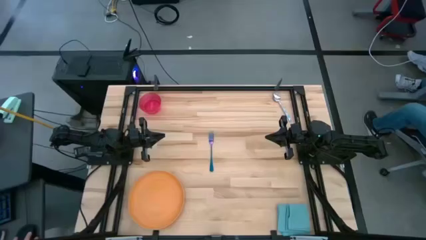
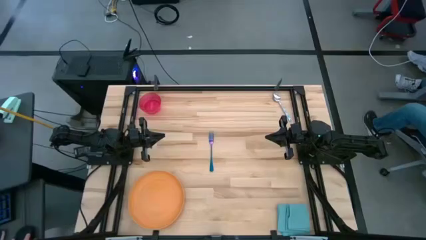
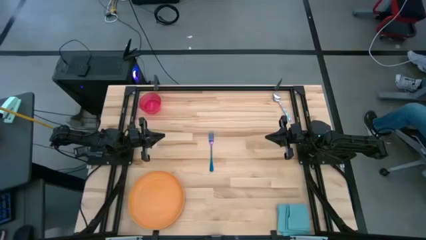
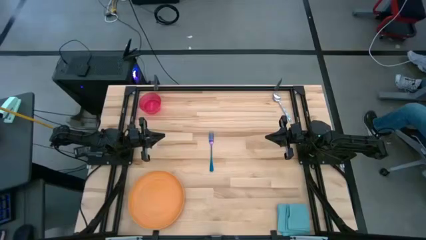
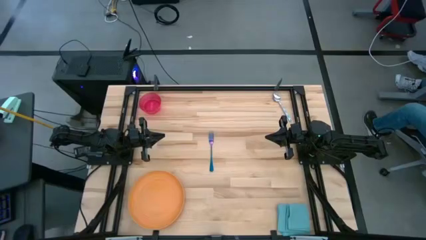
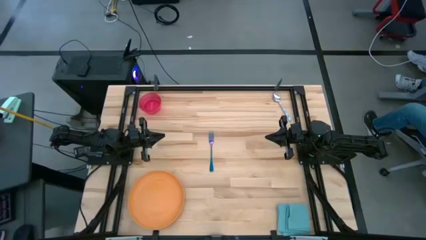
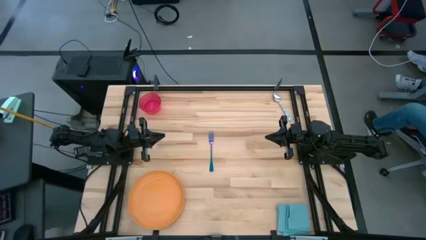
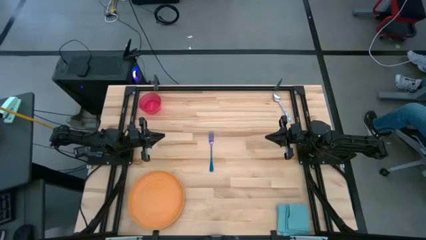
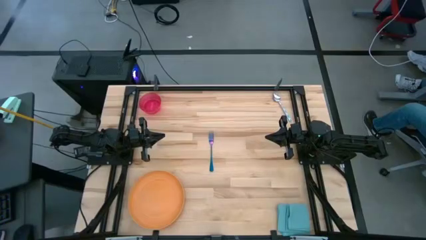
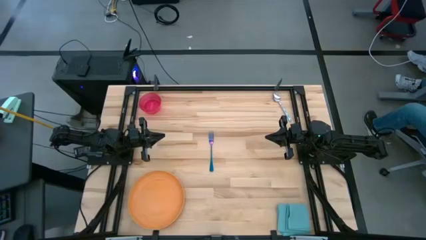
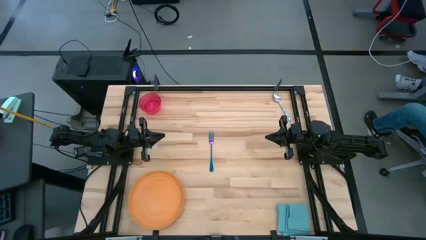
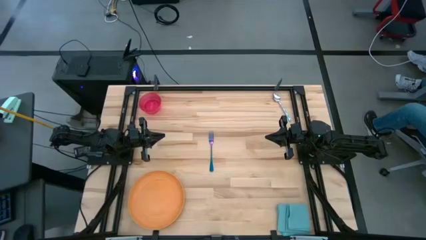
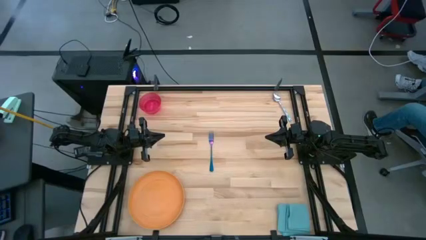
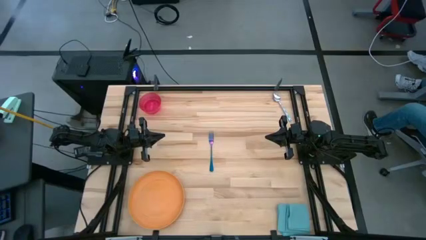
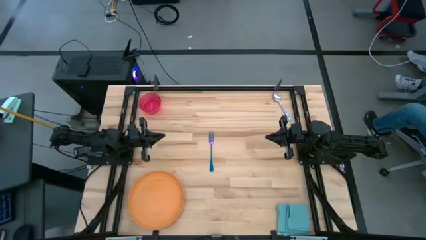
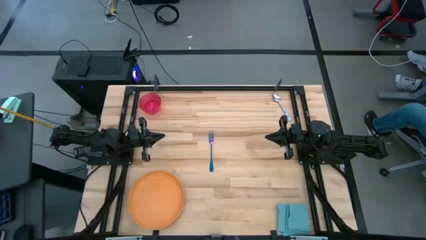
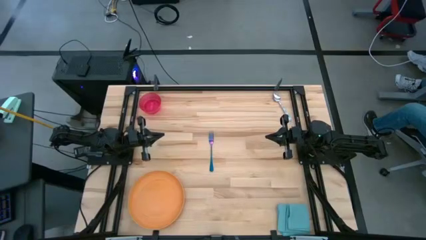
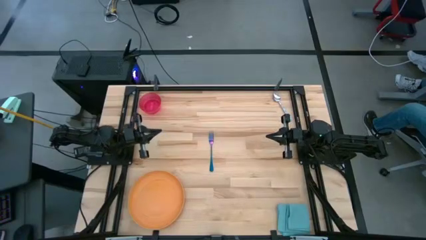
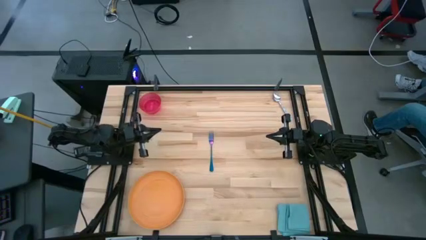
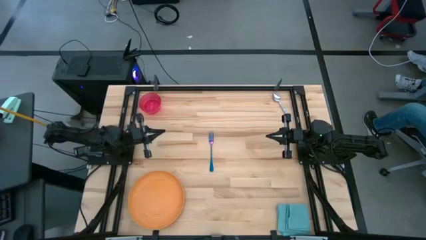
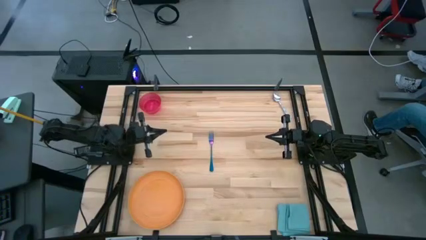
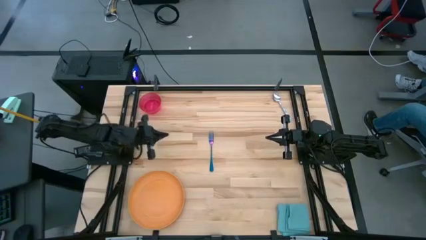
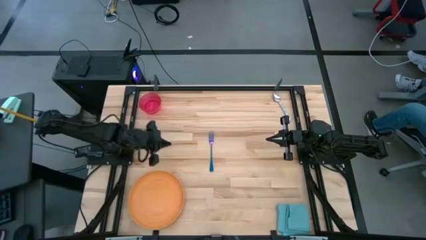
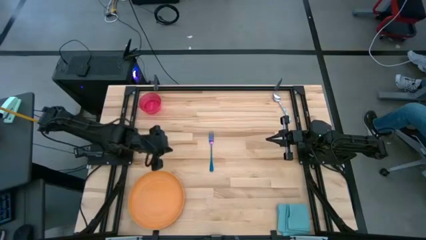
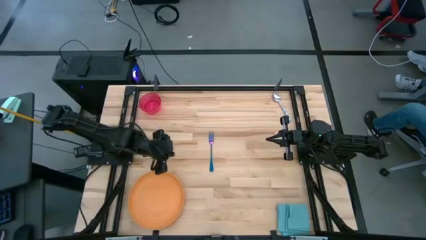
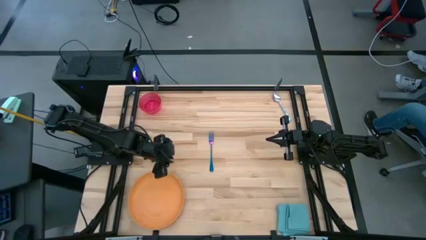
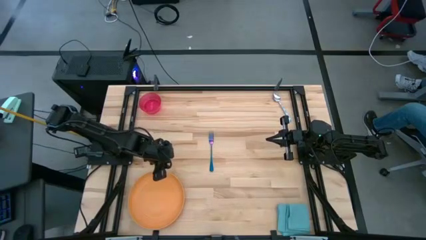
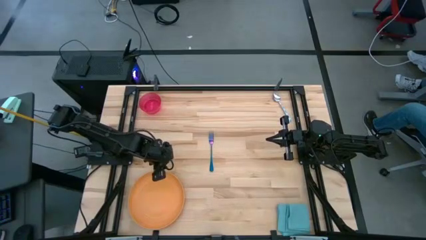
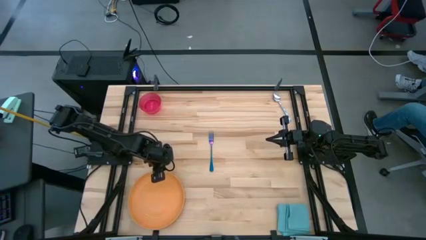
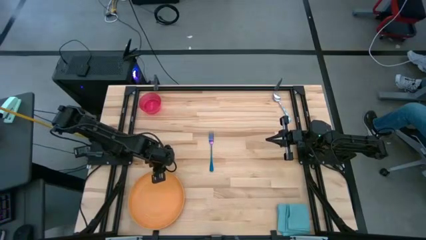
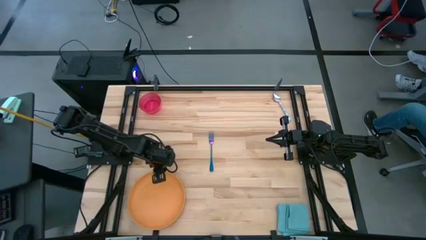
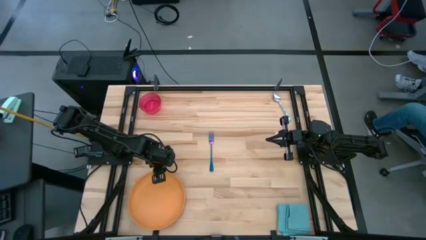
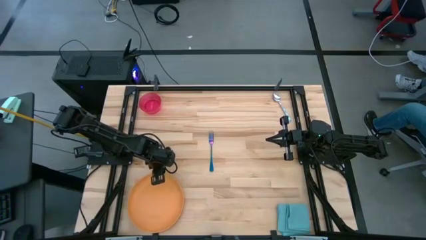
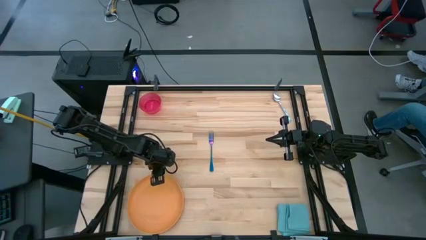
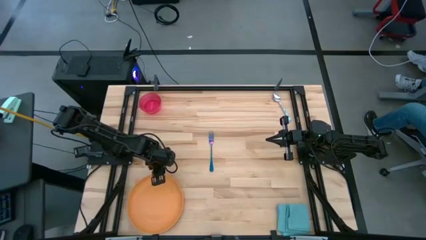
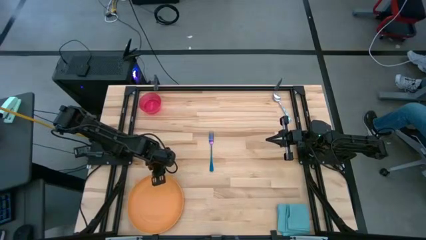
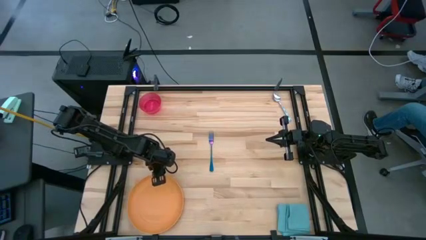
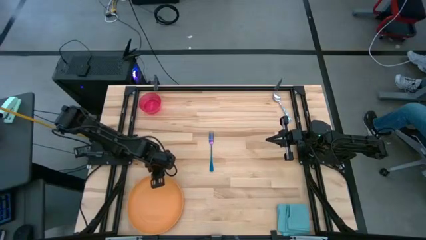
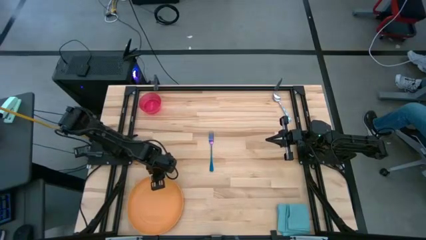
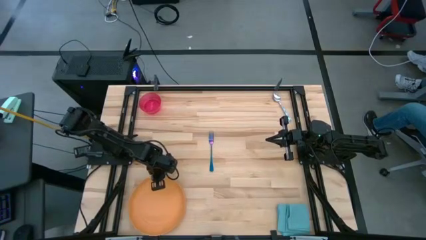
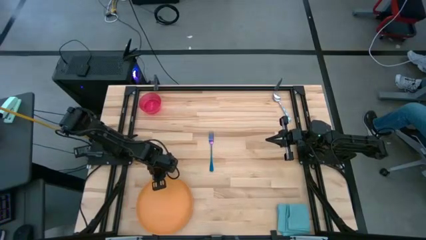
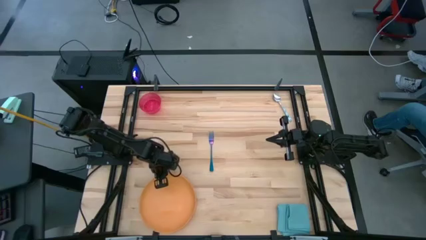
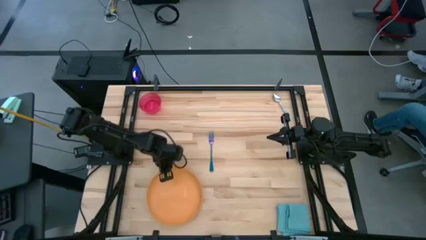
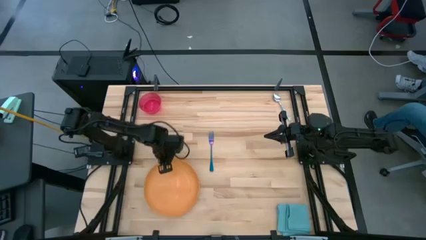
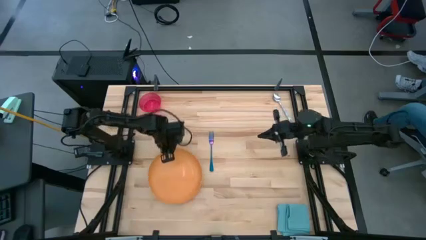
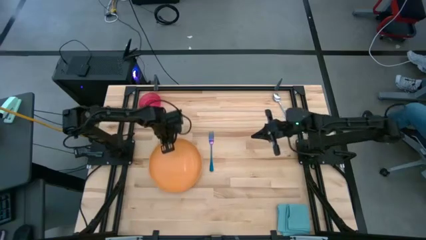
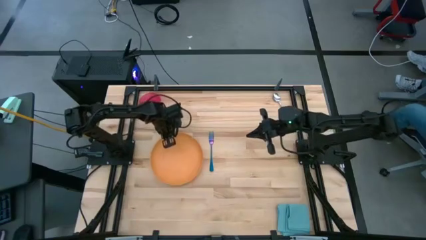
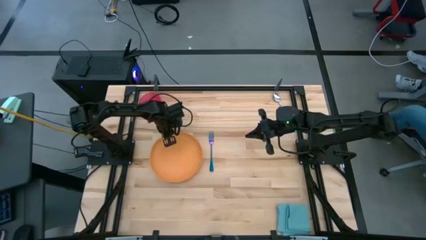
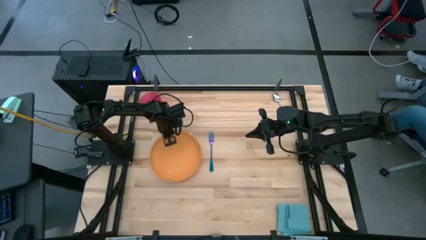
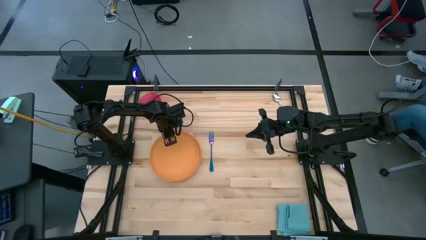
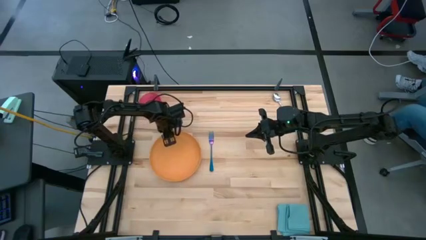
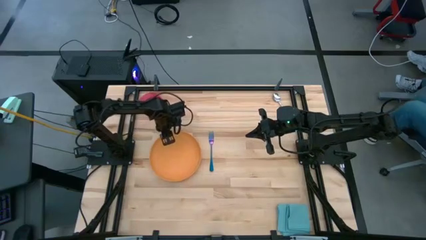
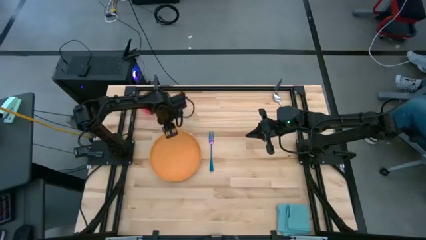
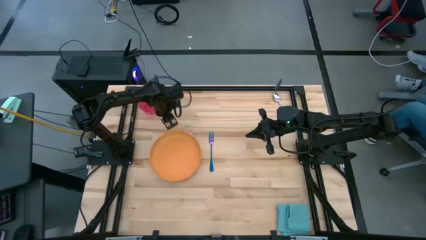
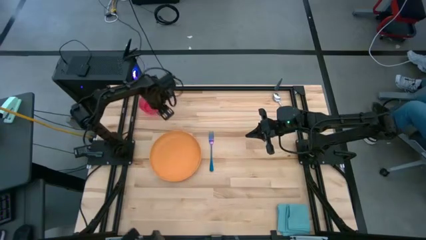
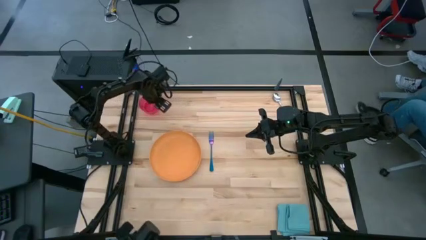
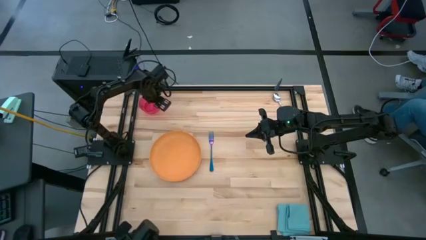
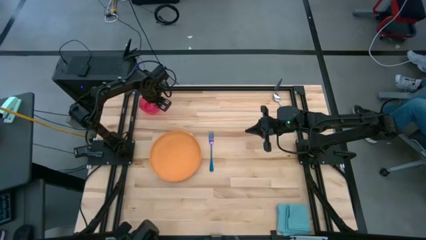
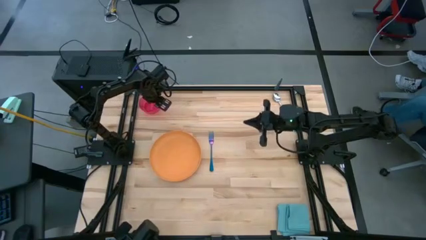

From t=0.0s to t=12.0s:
Task: Set table place
Place the pink bowl on the orange plate
